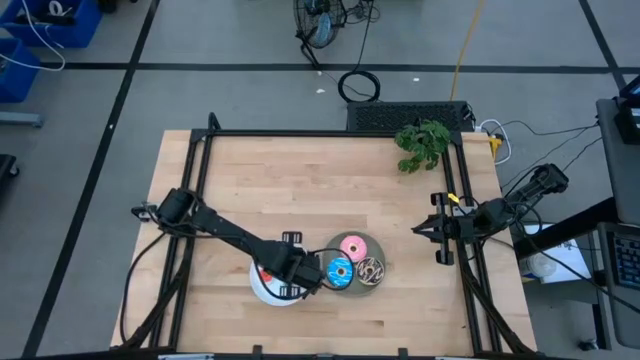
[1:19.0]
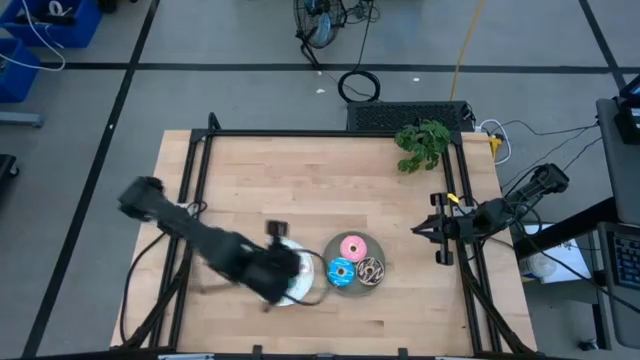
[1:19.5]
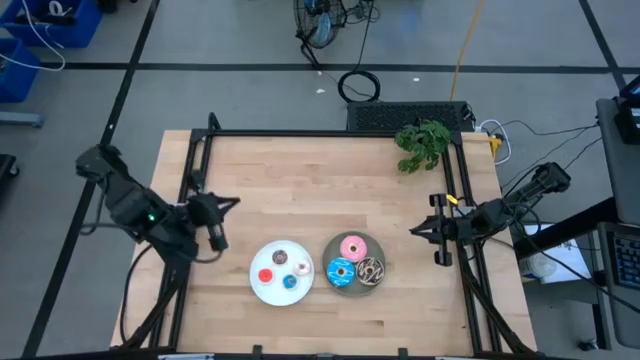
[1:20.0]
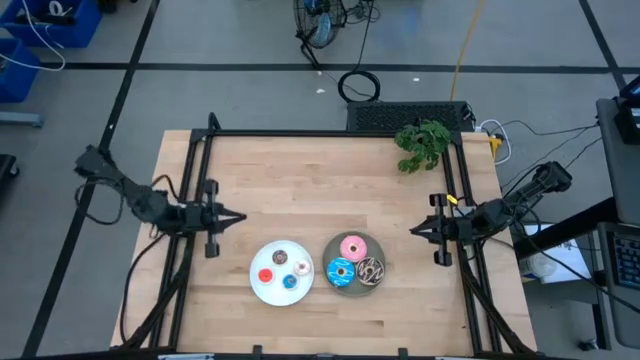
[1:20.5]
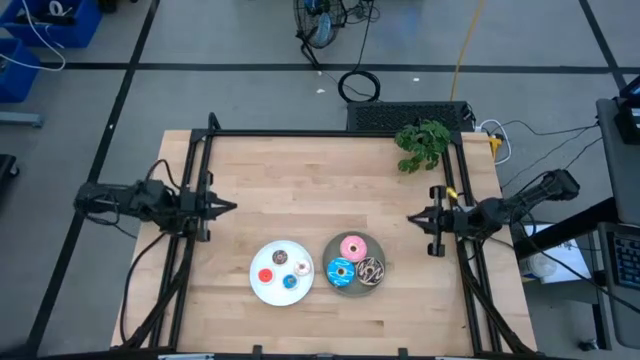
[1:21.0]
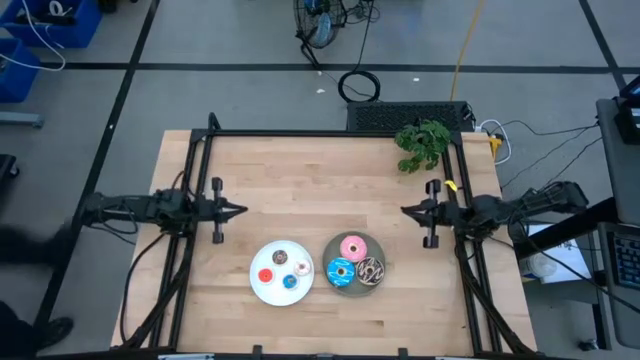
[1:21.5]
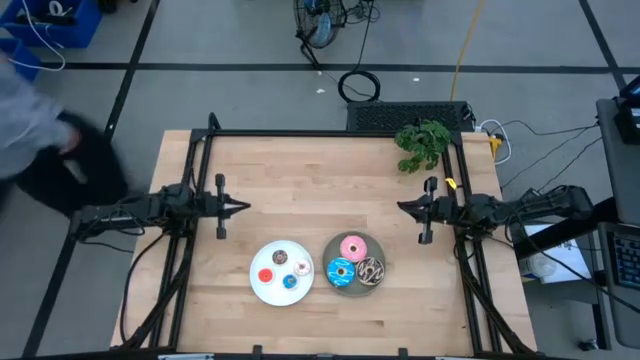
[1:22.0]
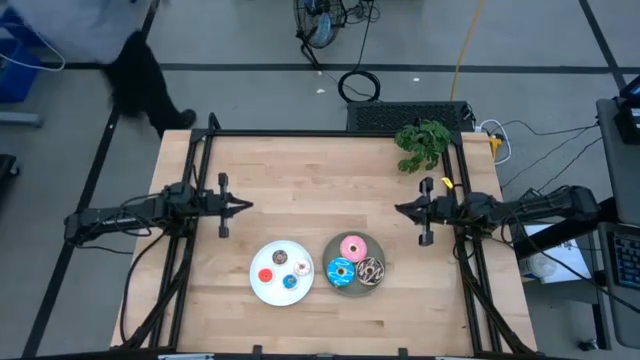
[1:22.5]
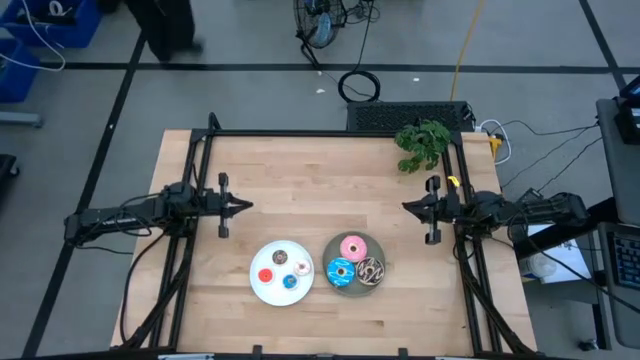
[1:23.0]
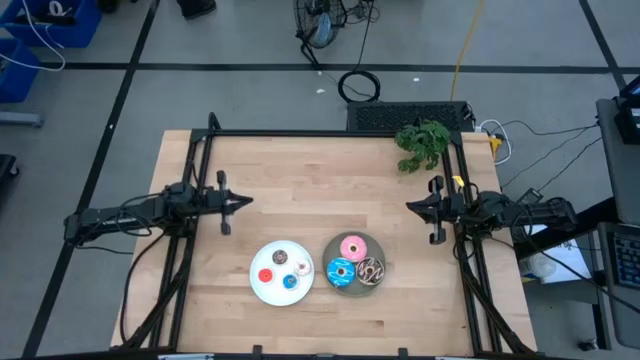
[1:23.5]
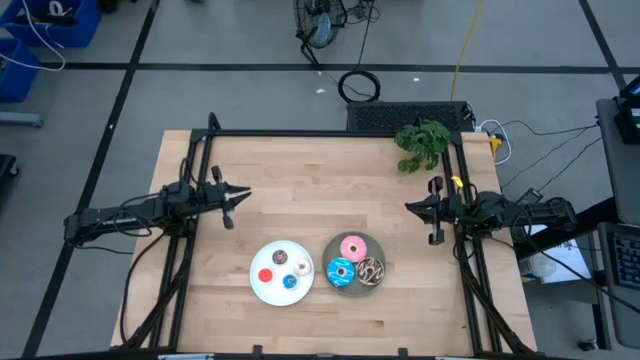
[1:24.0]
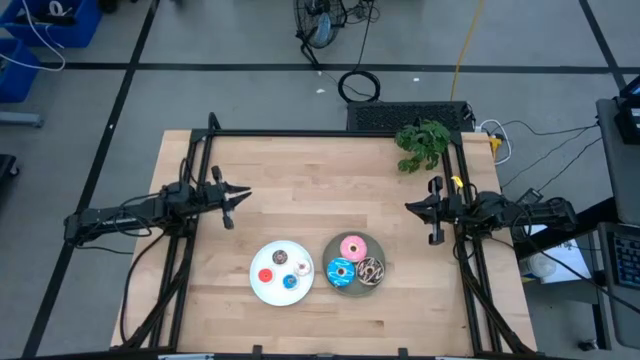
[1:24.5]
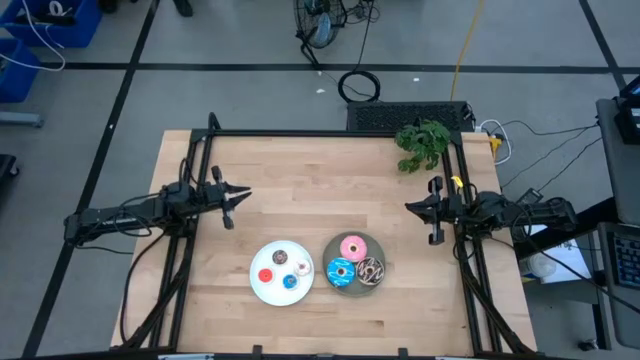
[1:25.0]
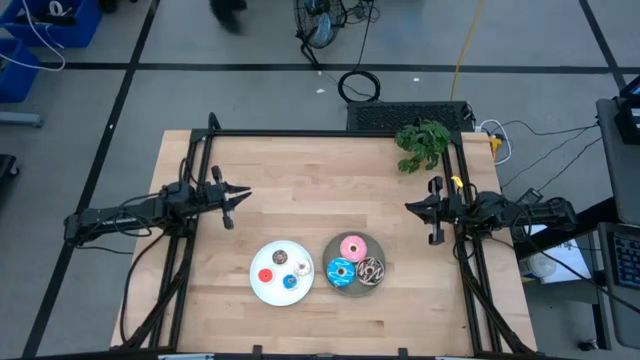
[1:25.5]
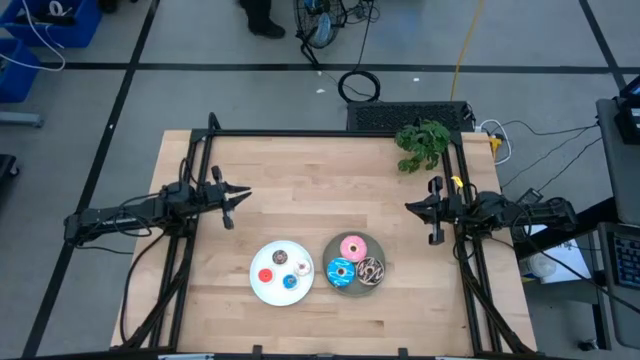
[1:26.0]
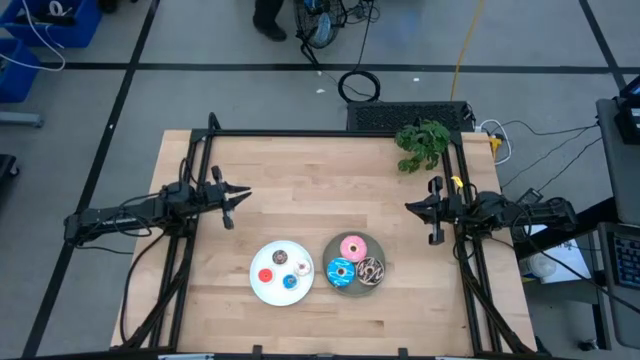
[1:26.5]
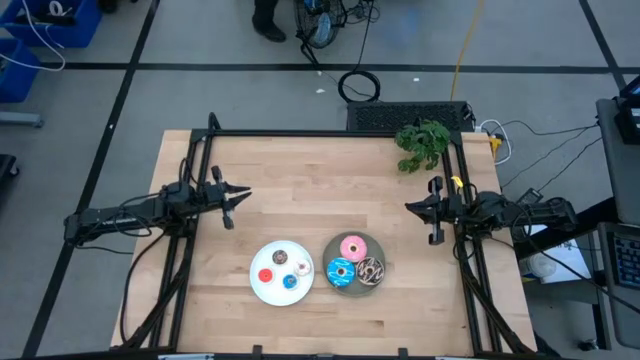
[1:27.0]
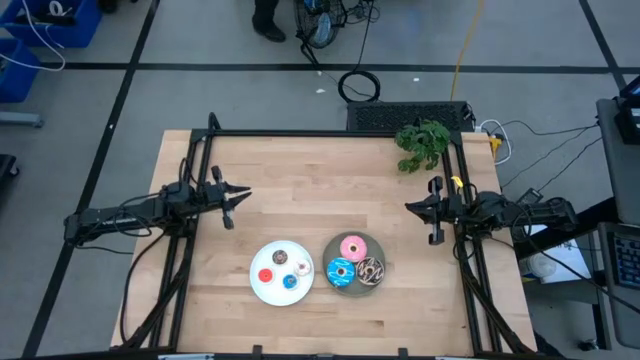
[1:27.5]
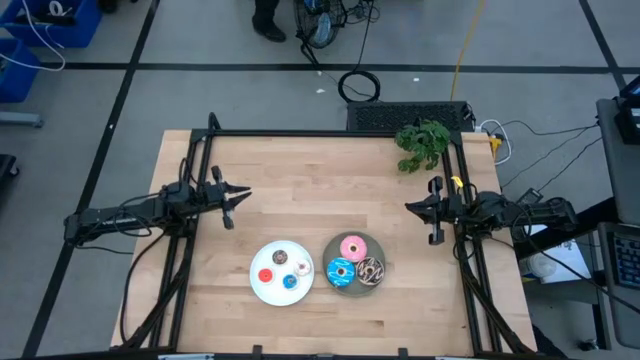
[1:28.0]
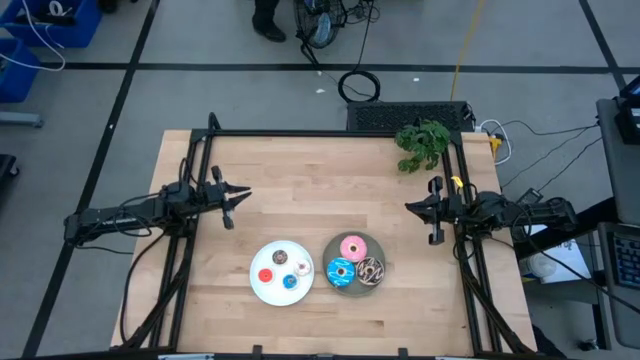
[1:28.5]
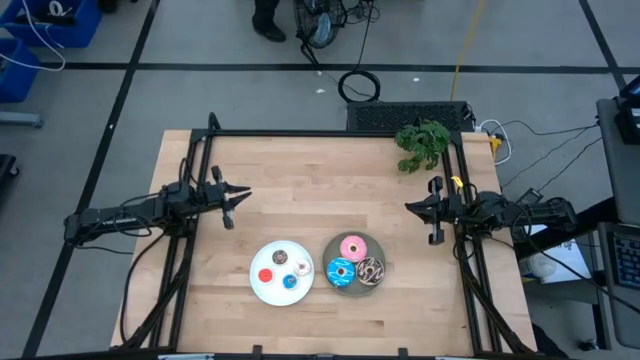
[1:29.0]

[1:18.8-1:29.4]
Task: Pick & Place donuts
Return to Home Position

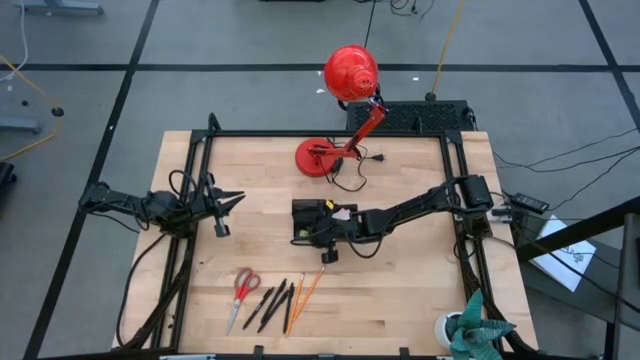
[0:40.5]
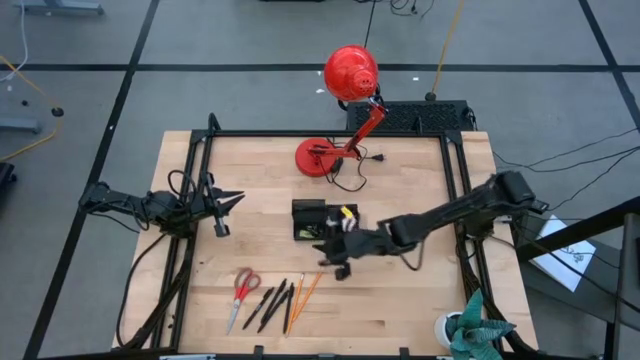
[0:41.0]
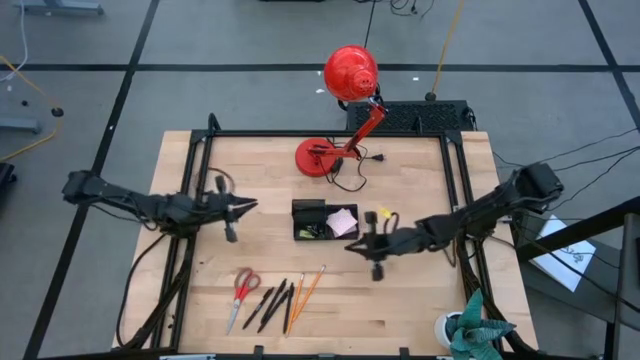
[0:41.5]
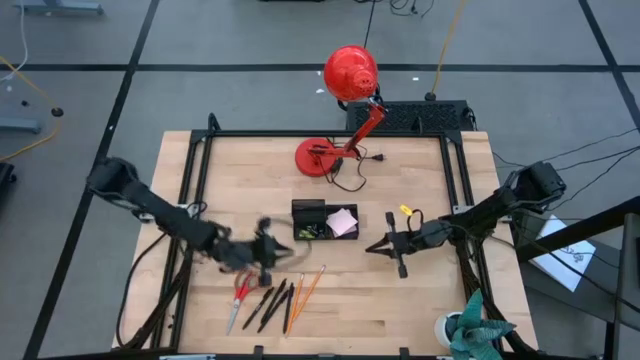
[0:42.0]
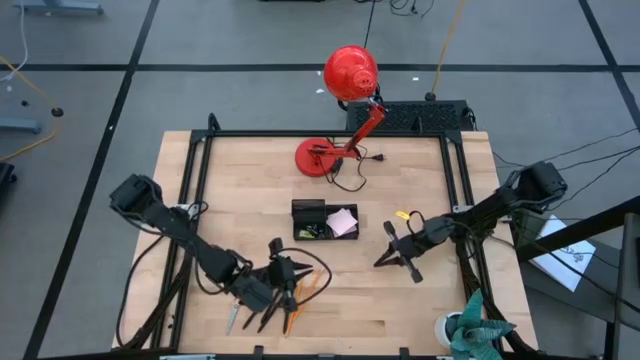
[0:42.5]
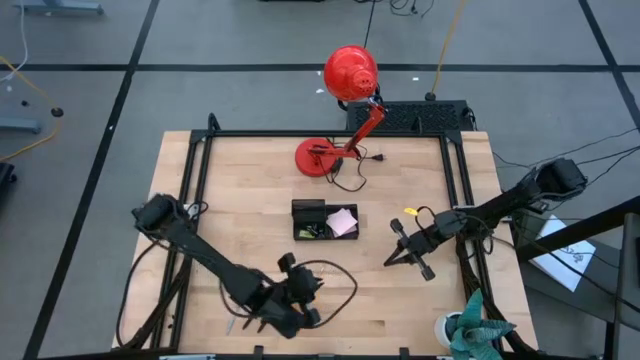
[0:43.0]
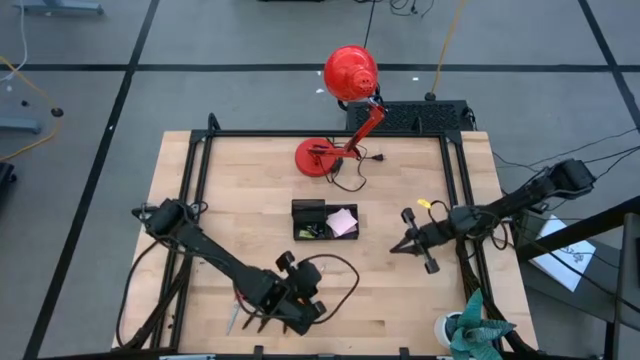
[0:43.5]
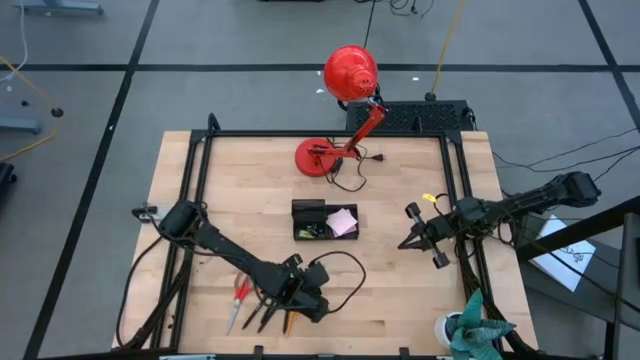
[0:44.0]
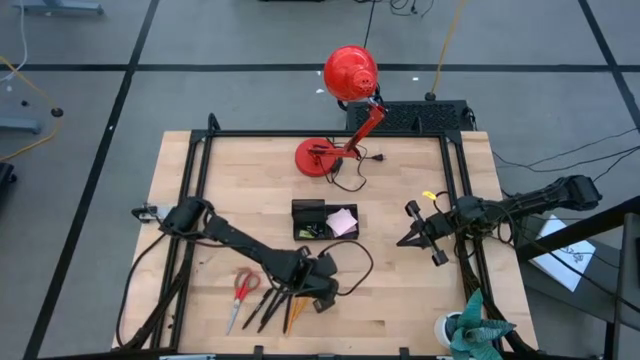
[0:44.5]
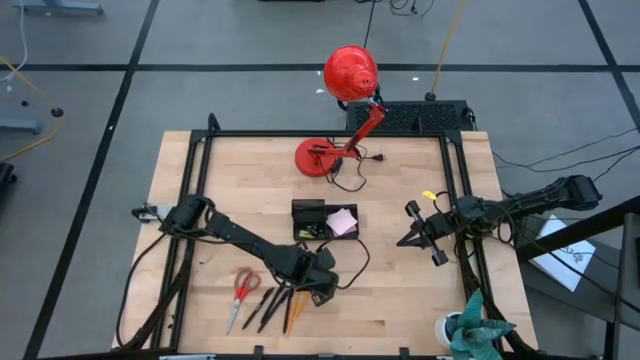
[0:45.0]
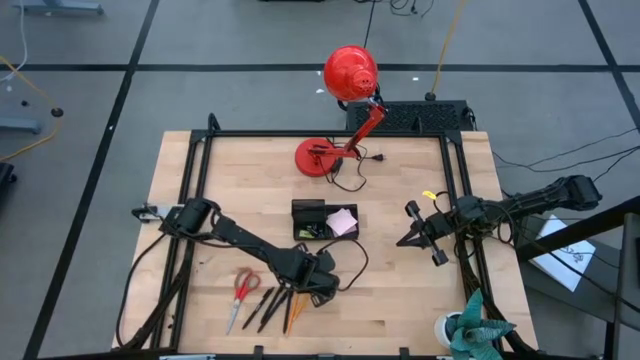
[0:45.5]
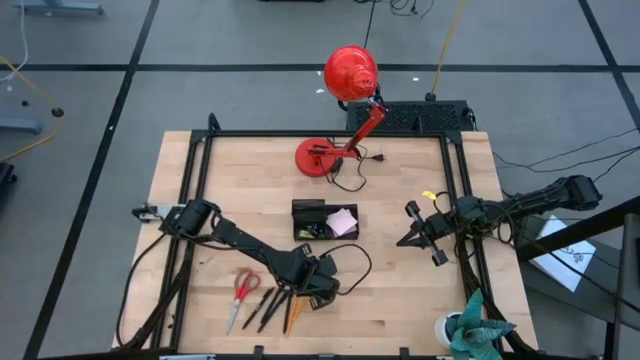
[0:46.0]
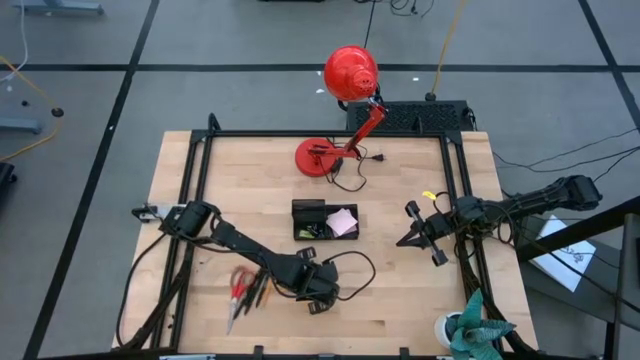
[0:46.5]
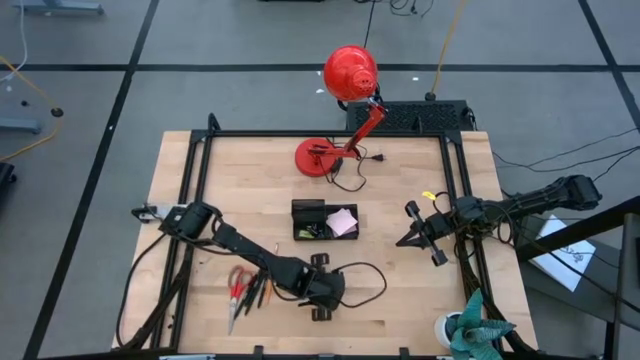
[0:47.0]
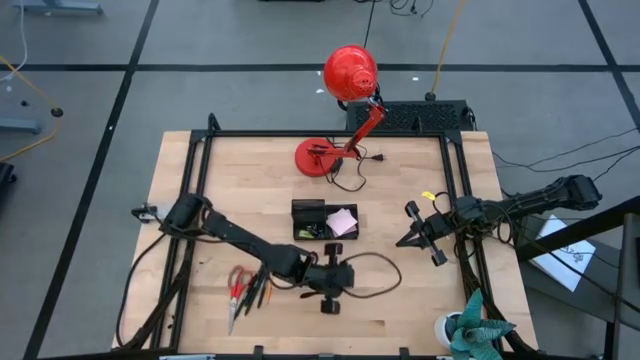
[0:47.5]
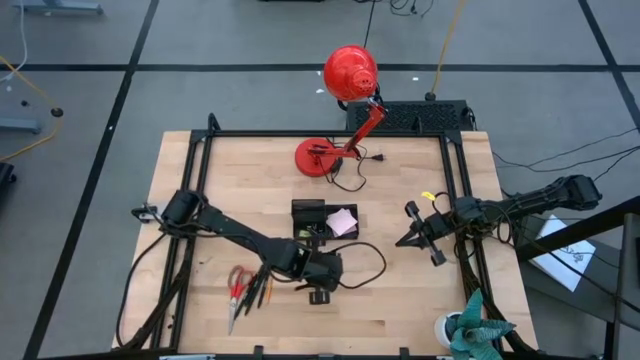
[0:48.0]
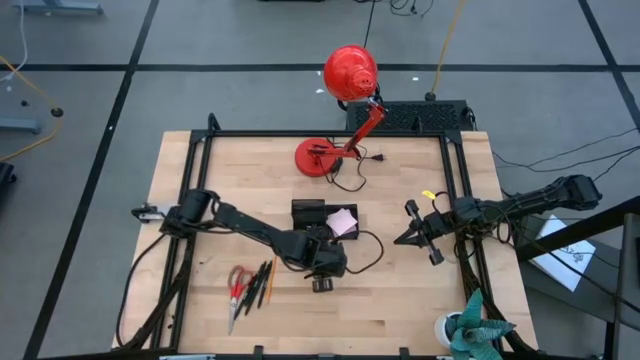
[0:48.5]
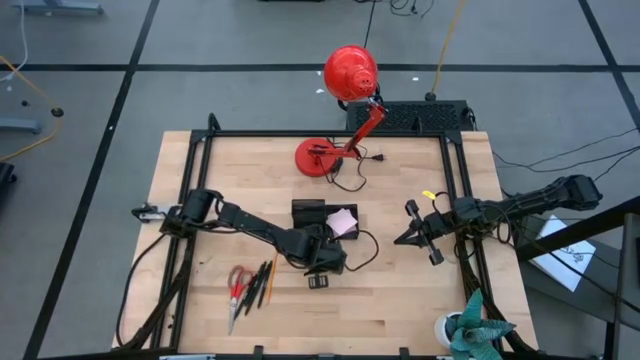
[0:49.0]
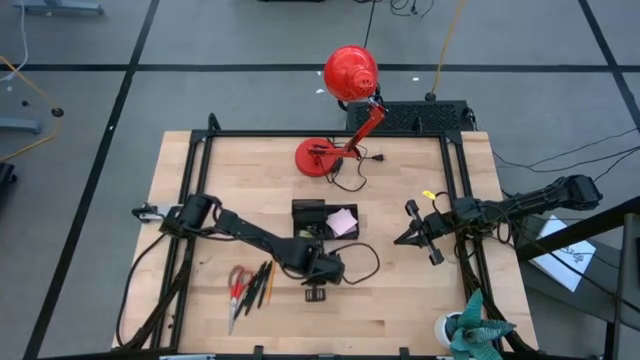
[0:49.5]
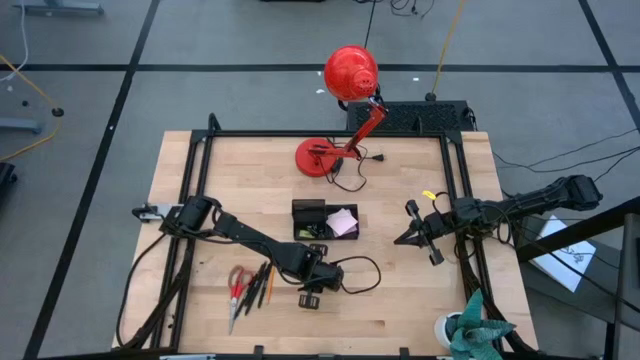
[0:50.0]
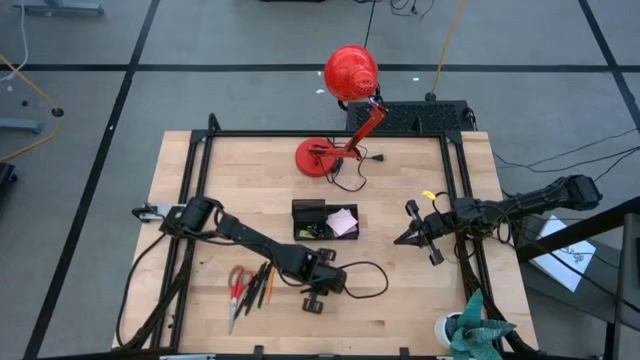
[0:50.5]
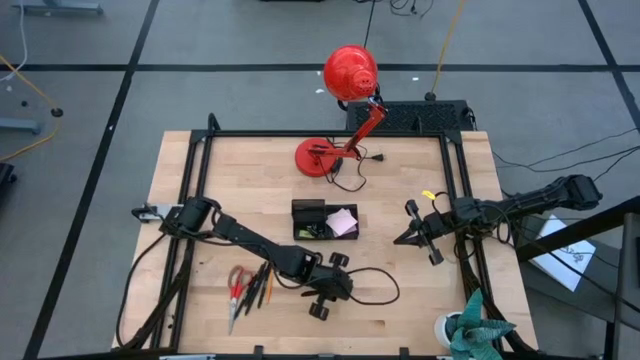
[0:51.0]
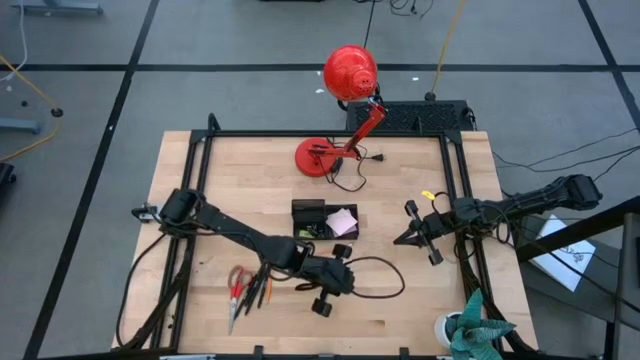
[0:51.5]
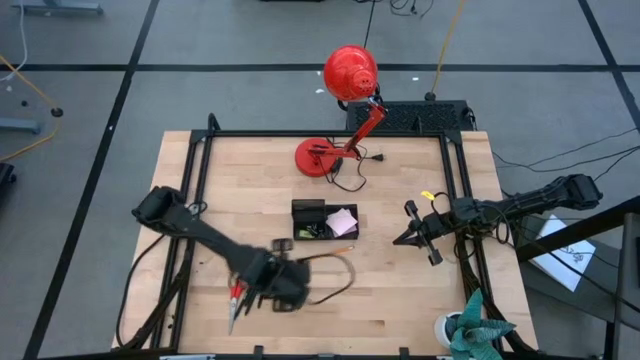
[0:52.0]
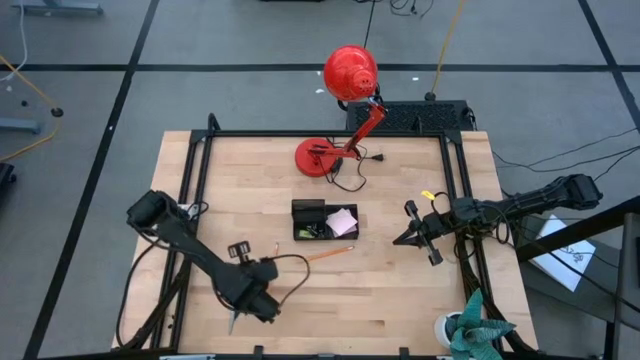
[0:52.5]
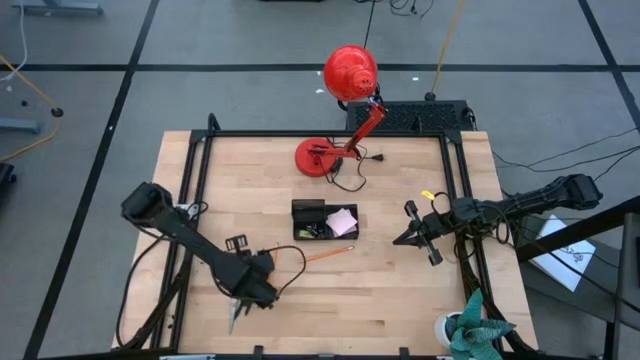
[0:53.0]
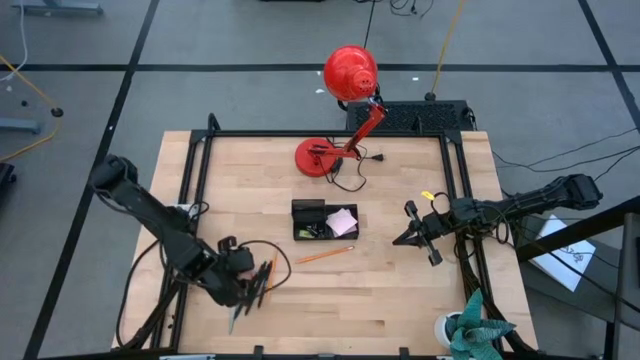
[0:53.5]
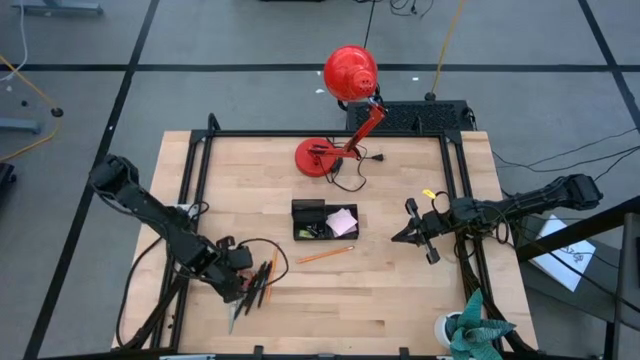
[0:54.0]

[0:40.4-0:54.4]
Task: Pick and place office supplies into organizer
Put the right yellow pencil into the desk organizer
